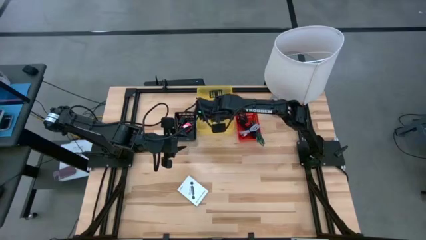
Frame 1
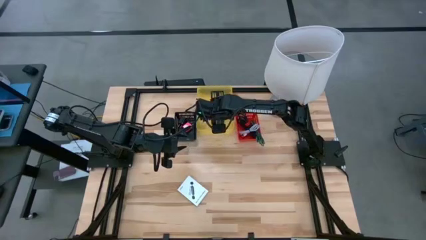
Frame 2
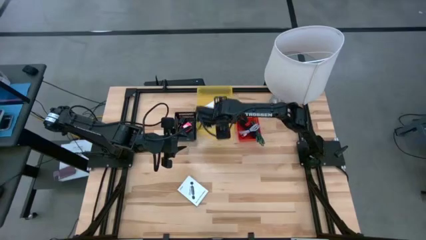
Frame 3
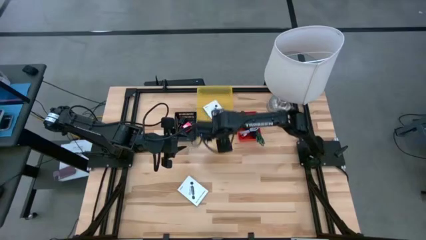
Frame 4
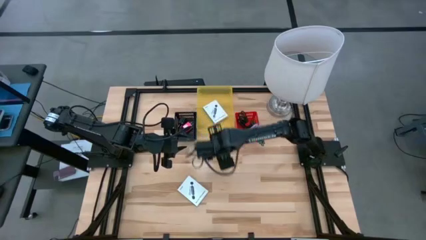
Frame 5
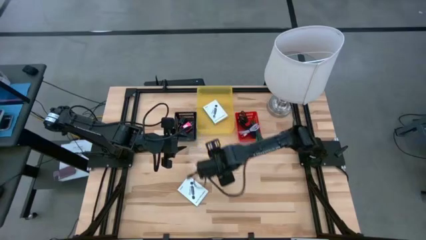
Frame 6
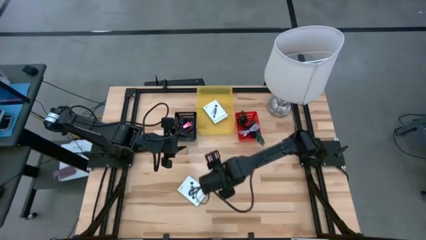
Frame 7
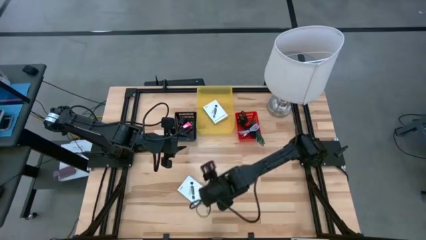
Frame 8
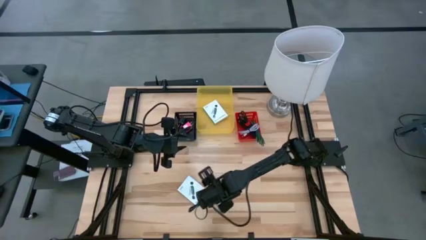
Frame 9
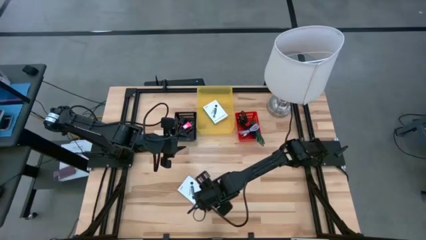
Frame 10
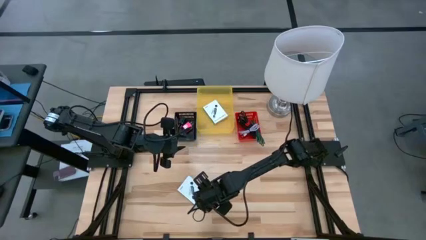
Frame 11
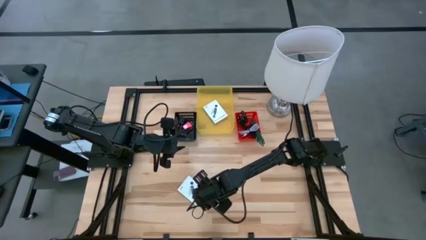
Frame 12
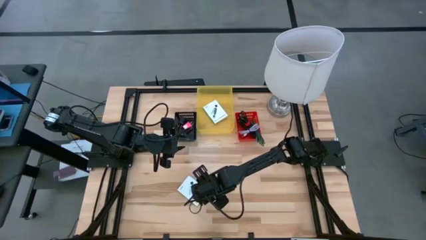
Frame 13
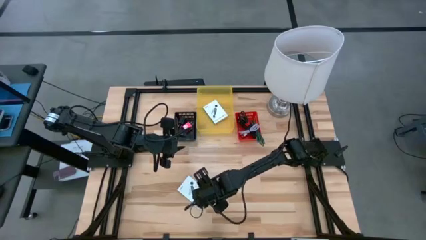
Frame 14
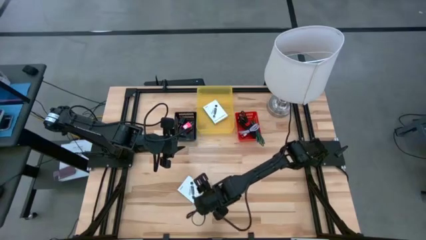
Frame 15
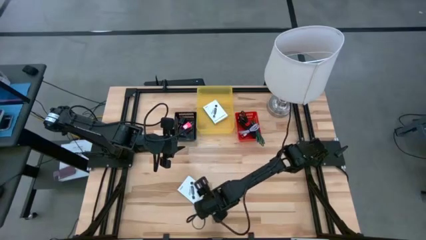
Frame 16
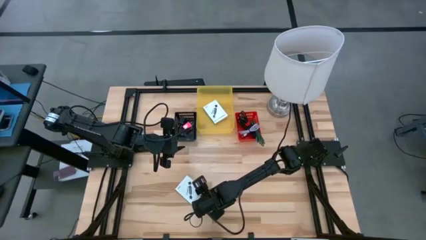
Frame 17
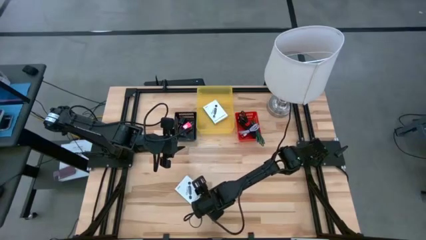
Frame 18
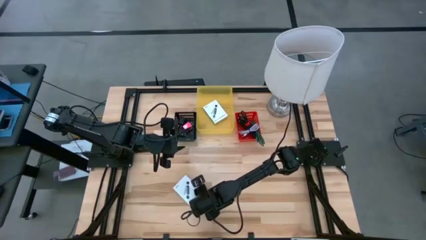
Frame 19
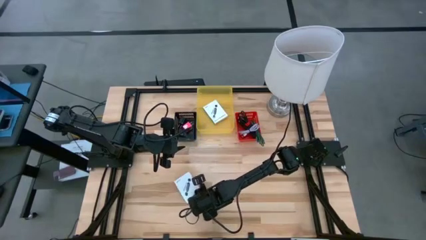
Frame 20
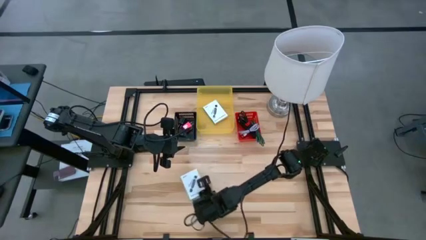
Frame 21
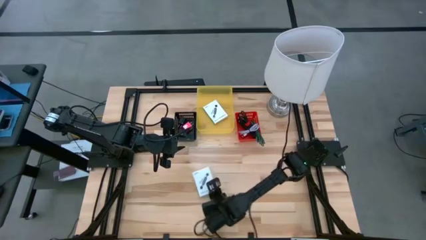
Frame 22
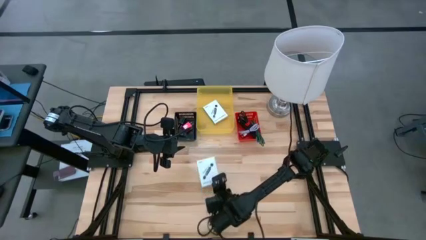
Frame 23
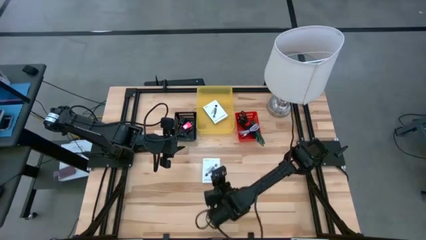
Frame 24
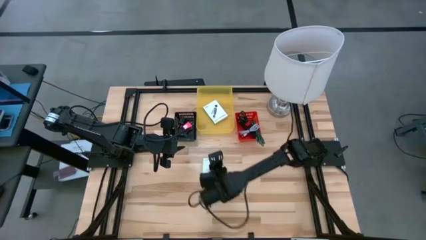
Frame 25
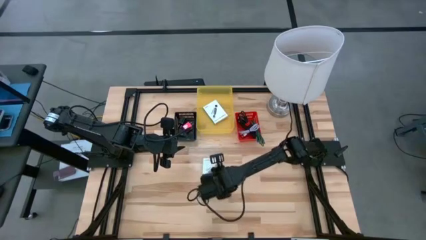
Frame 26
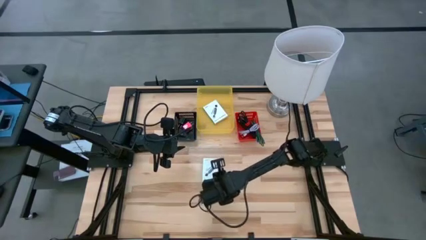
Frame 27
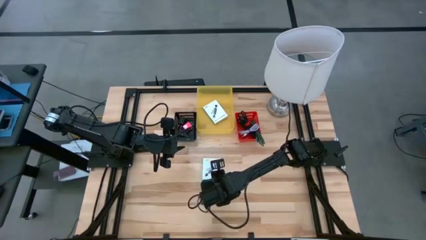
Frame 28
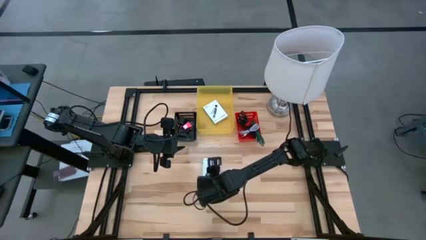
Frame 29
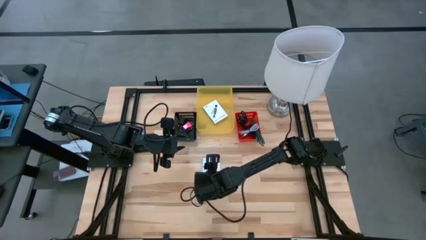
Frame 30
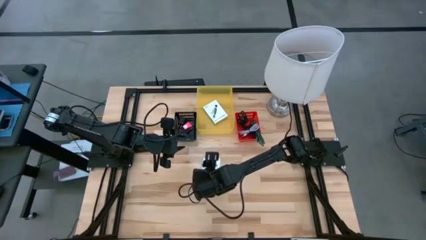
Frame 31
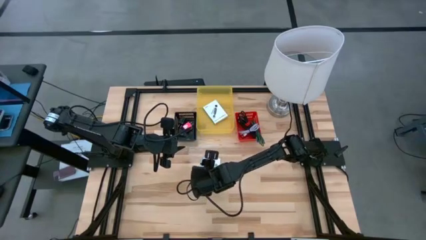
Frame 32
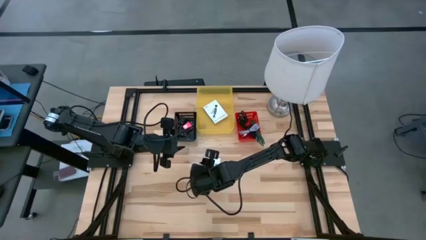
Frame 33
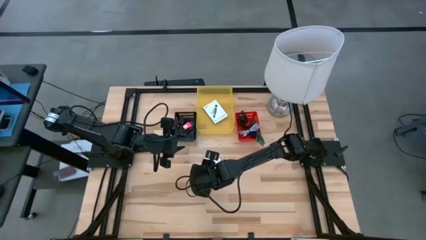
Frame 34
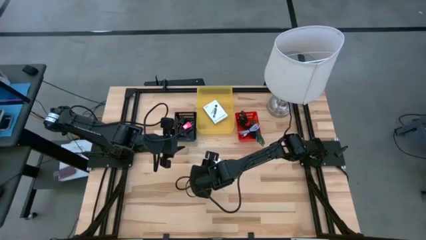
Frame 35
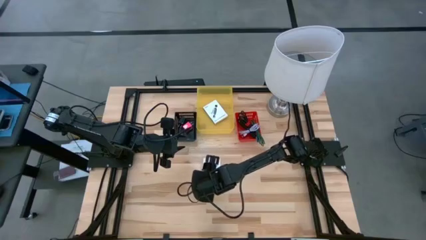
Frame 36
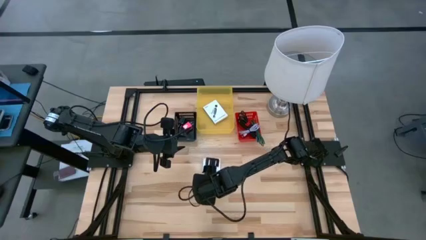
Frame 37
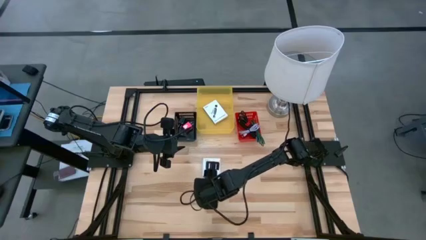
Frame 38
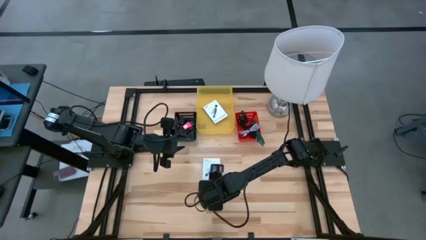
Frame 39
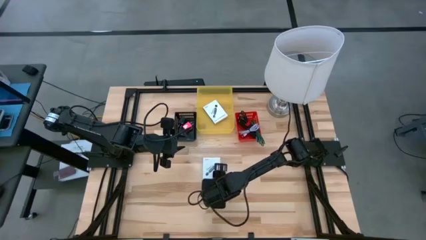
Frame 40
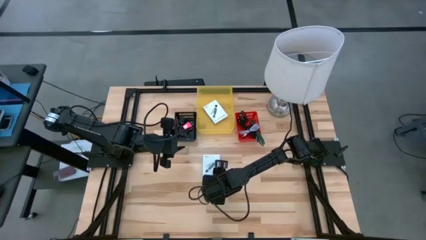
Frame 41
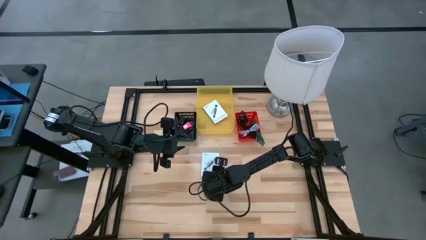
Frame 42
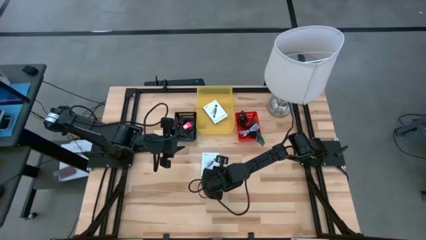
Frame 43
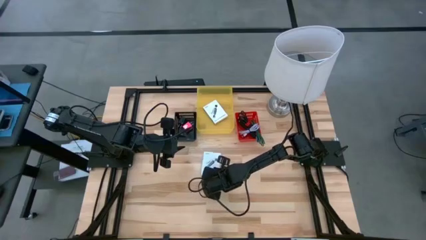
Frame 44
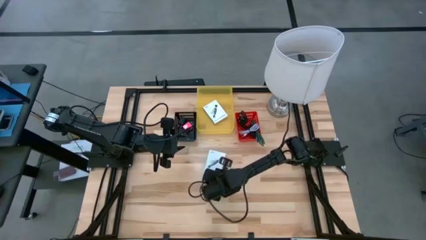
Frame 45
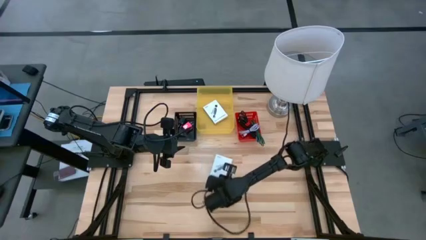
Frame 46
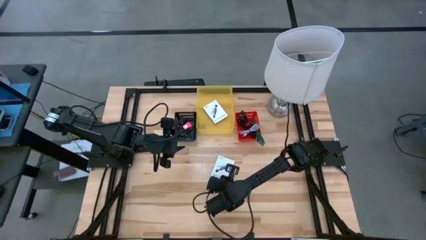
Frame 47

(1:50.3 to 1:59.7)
Task: Pick and place items into bin
Put the white card reader box into the yellow bin

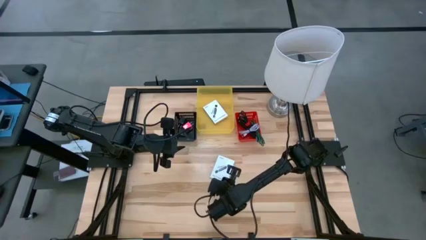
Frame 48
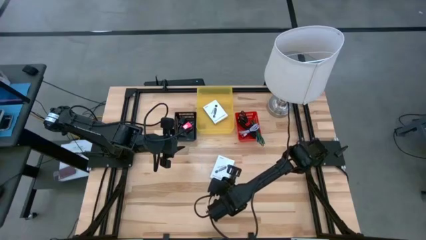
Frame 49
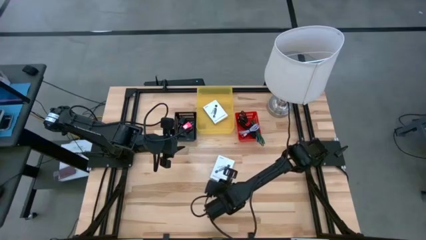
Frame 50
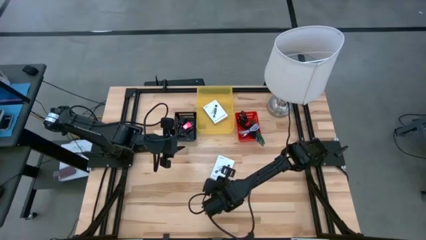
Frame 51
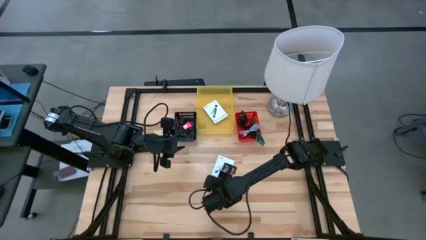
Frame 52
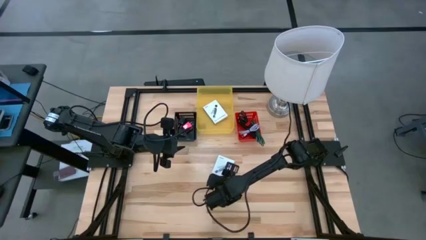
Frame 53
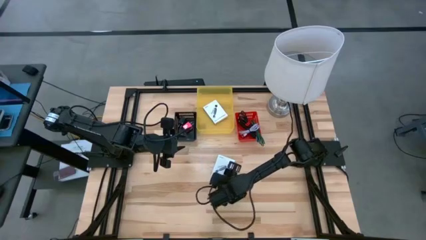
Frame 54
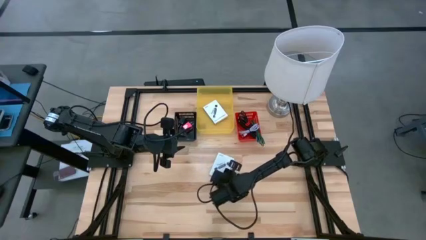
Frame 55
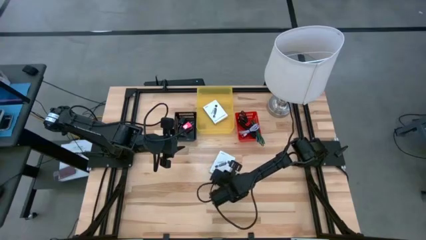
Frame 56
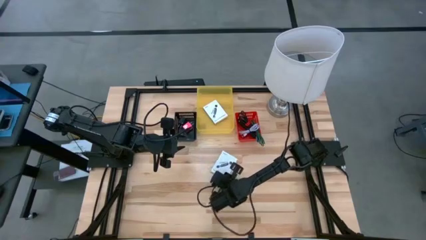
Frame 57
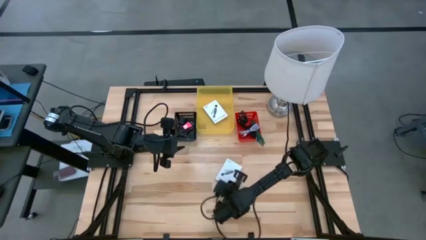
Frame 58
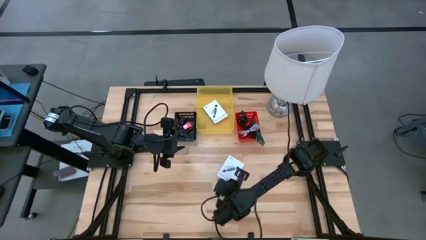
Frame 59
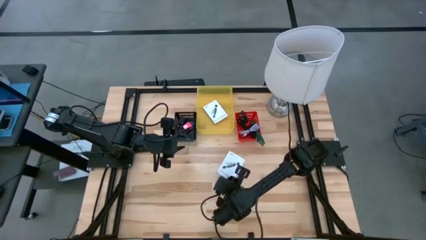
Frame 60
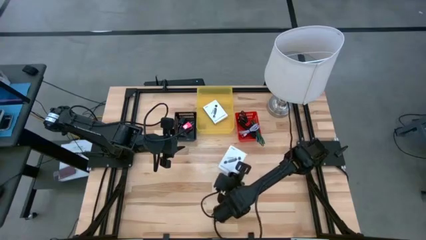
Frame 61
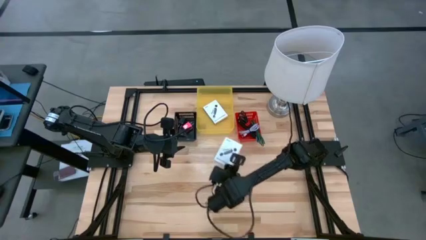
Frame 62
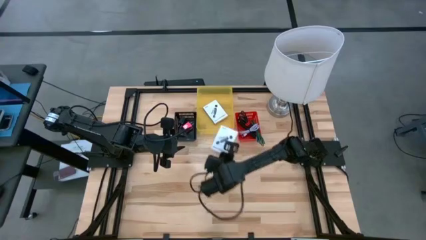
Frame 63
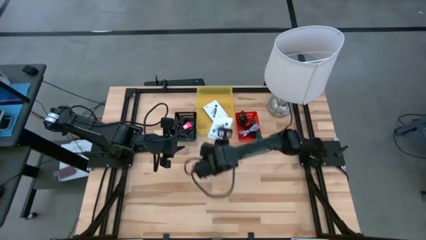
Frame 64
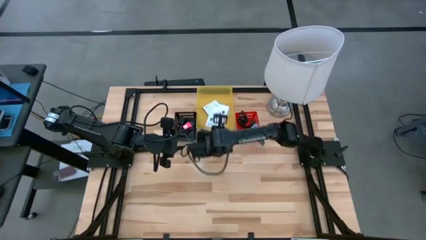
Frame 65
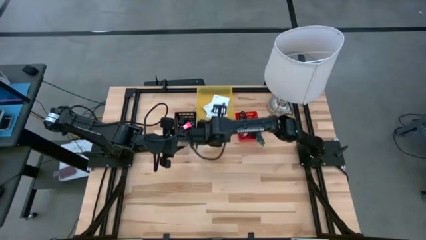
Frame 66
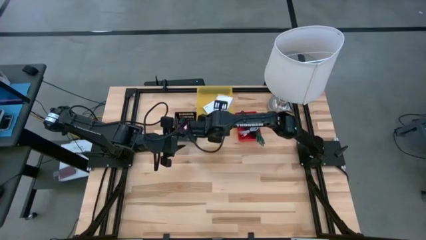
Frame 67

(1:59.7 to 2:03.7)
Put the white card reader box into the yellow bin

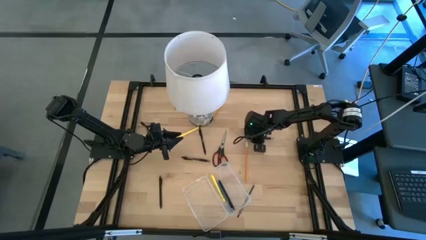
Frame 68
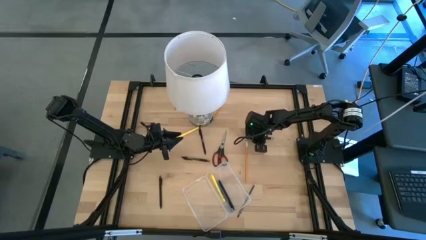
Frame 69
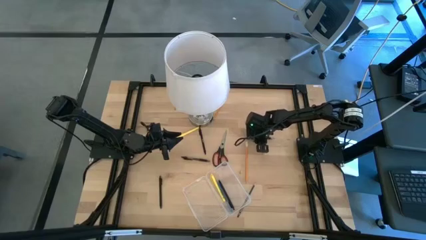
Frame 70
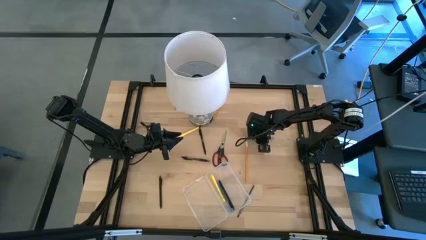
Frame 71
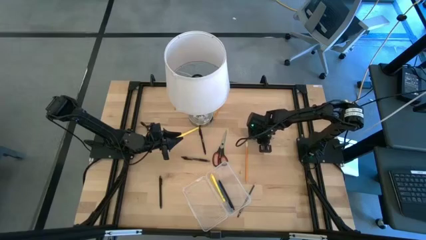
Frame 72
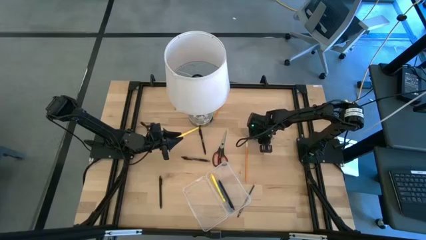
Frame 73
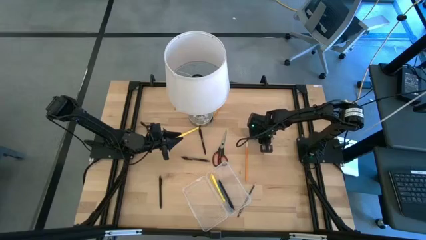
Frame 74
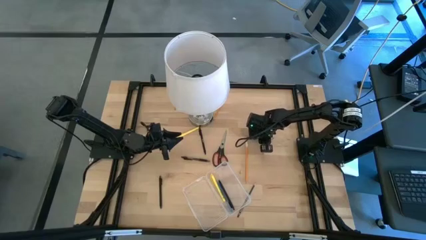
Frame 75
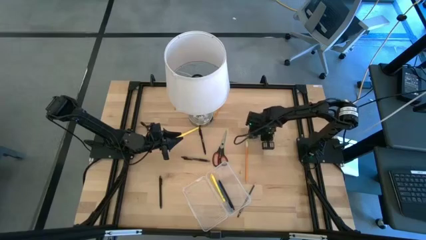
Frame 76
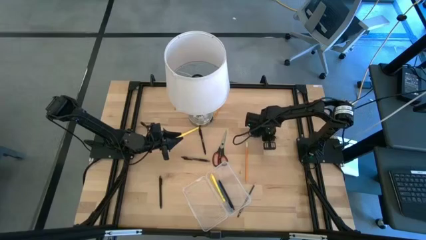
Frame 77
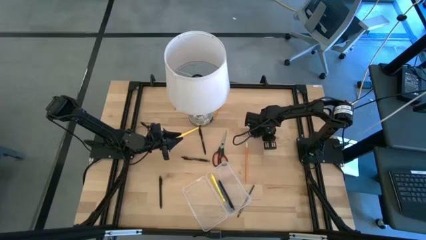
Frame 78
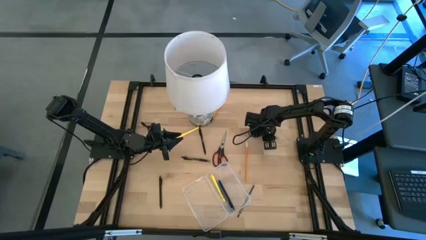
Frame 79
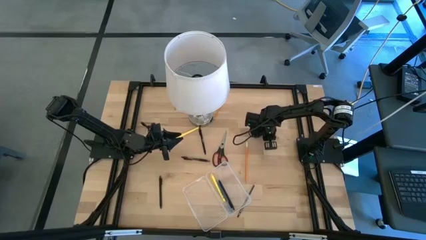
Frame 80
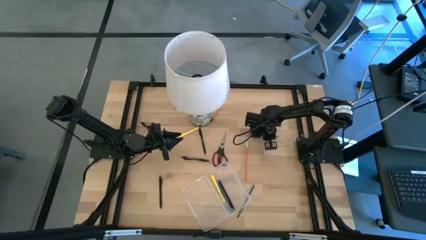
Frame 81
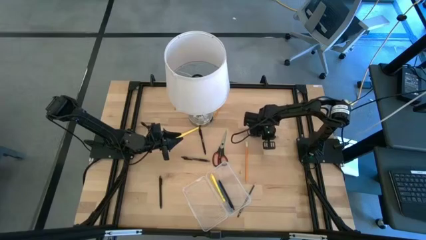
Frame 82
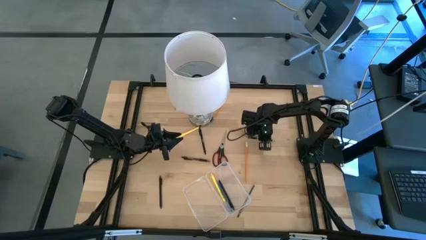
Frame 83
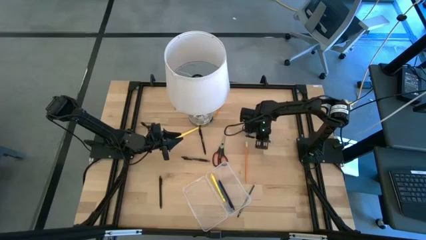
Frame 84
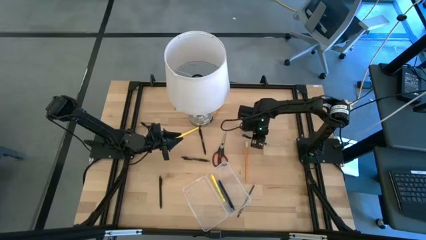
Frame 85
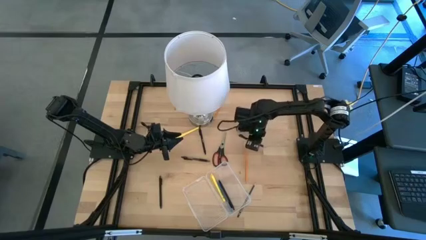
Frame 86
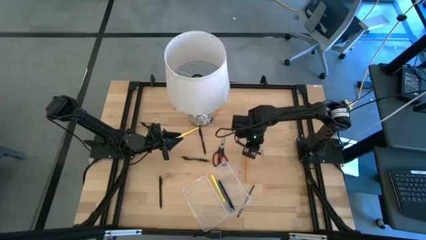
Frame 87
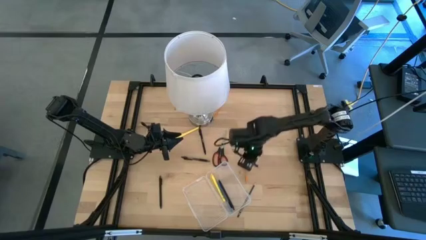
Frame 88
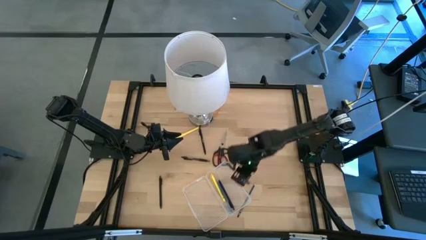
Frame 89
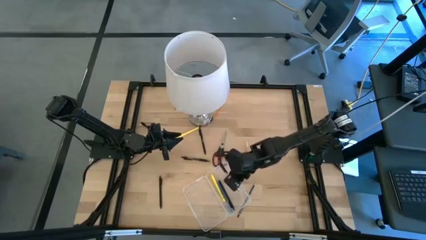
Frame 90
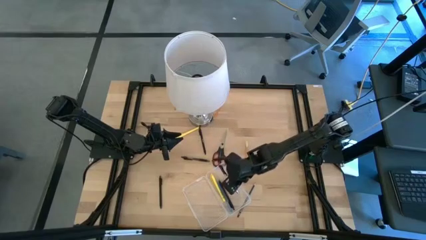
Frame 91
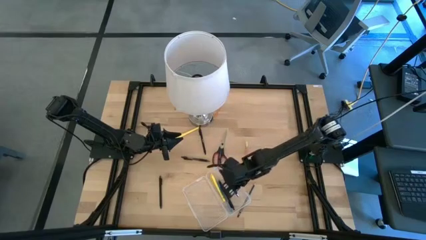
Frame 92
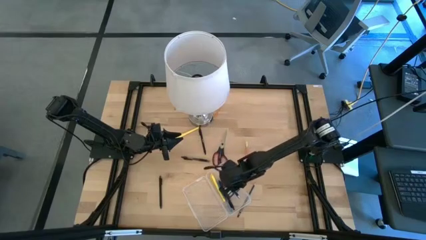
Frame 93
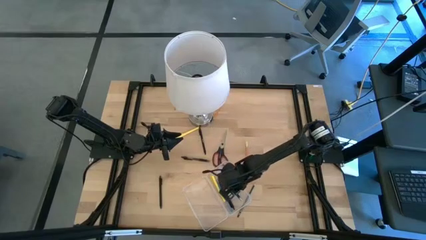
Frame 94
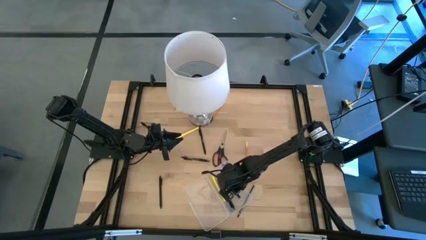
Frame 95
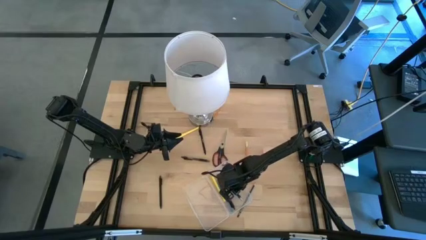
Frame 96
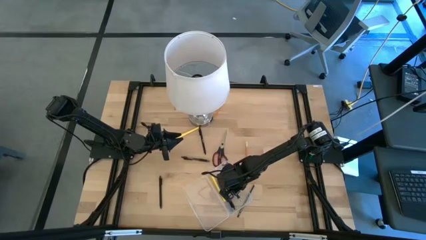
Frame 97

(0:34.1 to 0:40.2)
Task: Pick & place school supplies into a supply box
Put the top black white pen into the transparent supply box
